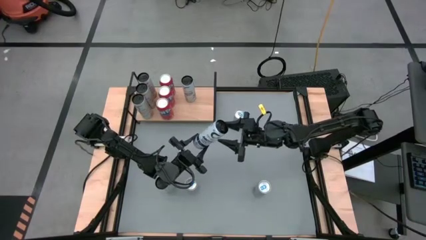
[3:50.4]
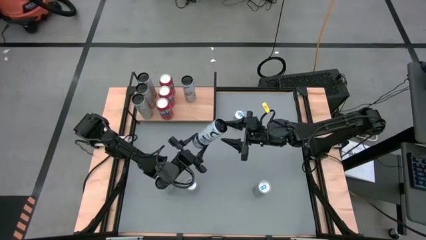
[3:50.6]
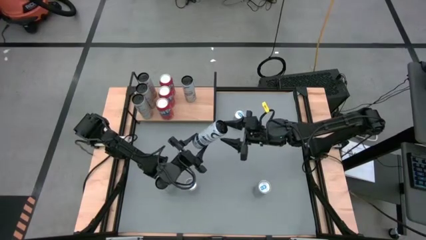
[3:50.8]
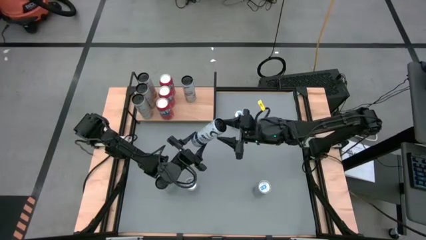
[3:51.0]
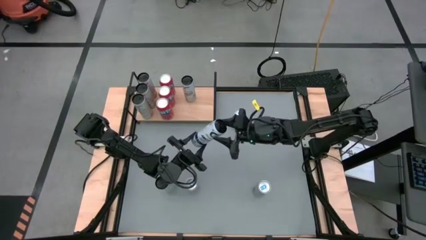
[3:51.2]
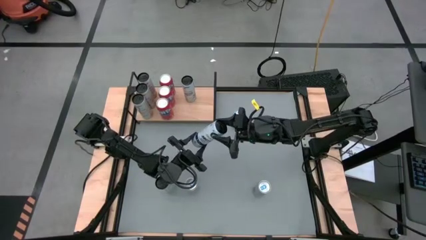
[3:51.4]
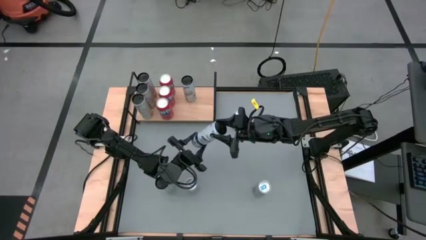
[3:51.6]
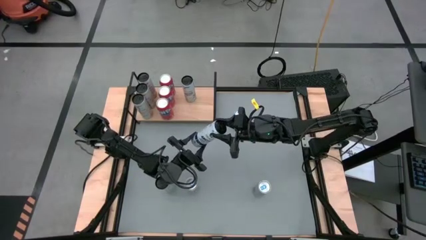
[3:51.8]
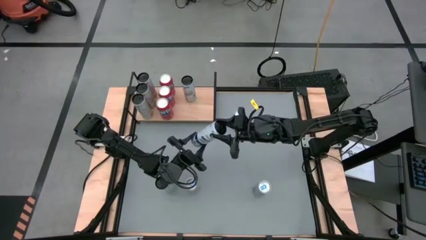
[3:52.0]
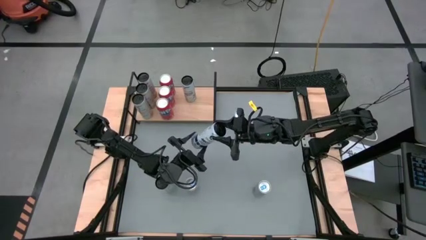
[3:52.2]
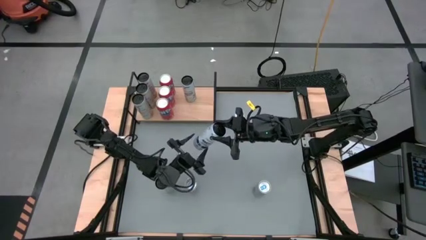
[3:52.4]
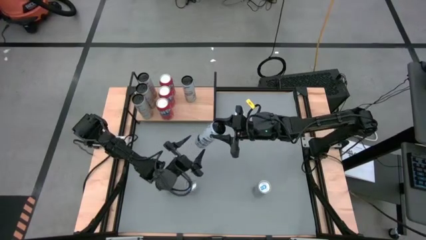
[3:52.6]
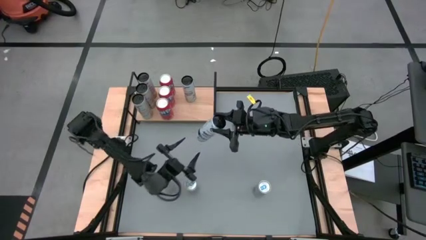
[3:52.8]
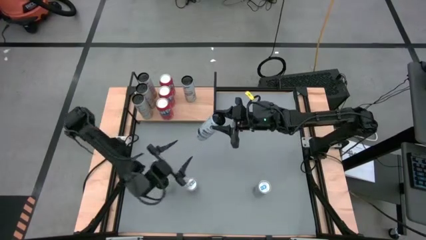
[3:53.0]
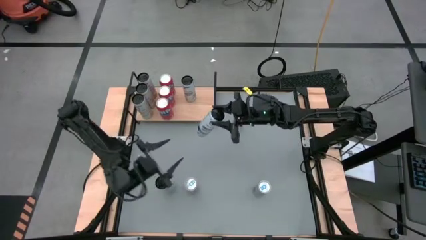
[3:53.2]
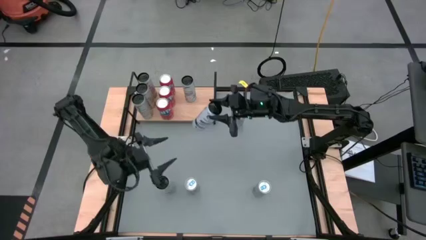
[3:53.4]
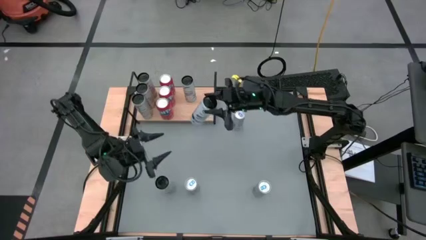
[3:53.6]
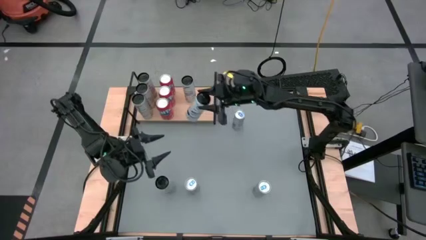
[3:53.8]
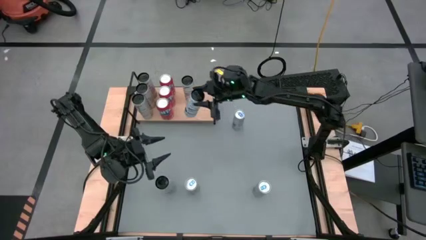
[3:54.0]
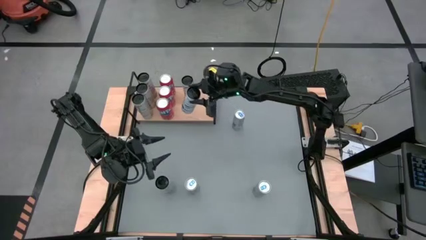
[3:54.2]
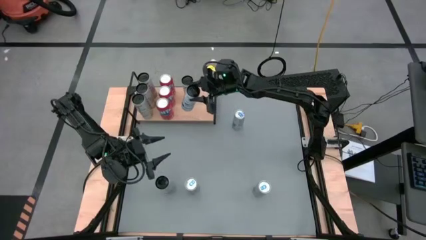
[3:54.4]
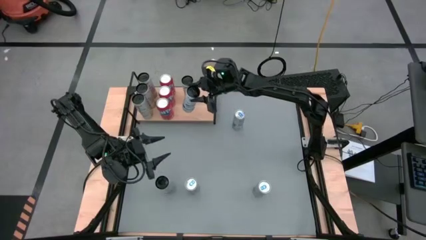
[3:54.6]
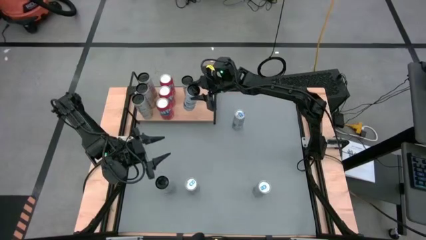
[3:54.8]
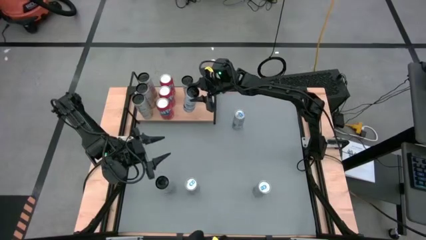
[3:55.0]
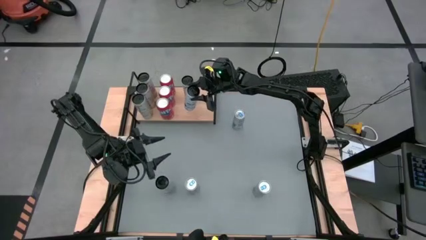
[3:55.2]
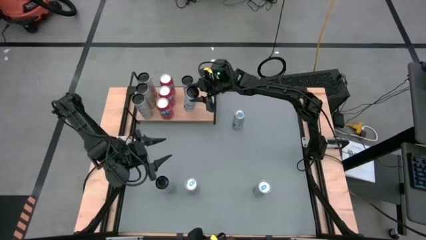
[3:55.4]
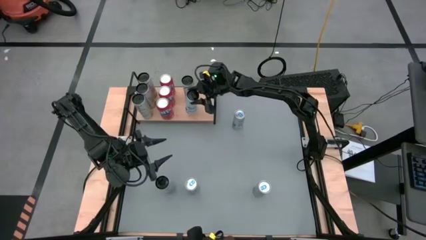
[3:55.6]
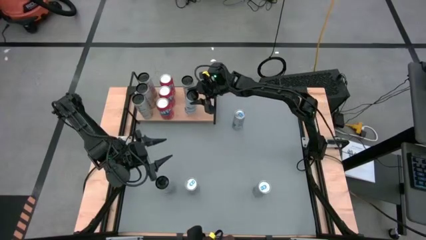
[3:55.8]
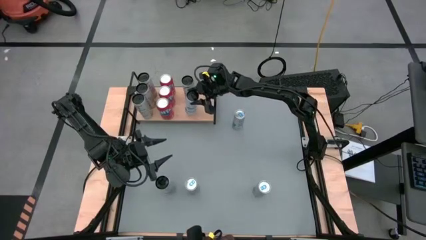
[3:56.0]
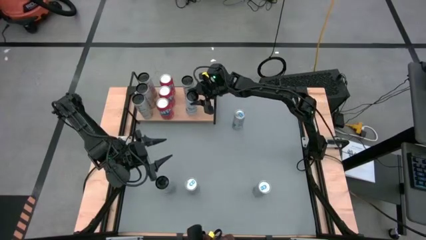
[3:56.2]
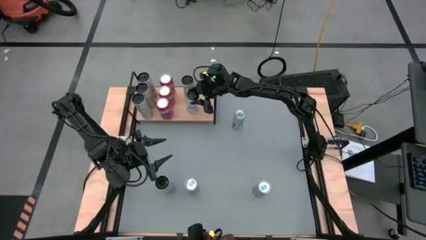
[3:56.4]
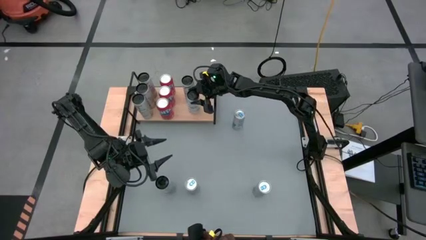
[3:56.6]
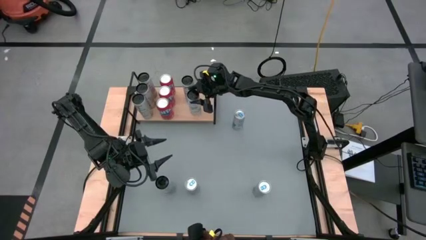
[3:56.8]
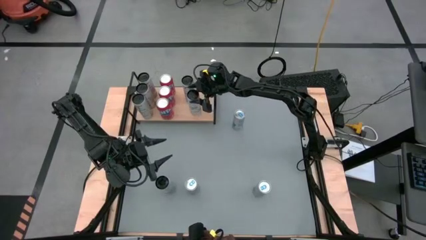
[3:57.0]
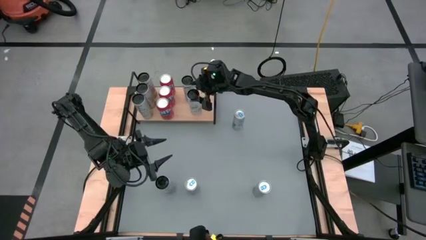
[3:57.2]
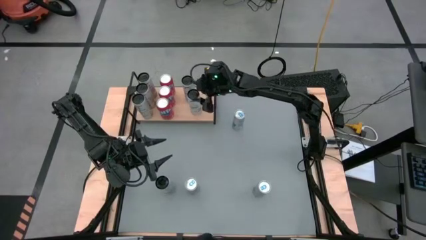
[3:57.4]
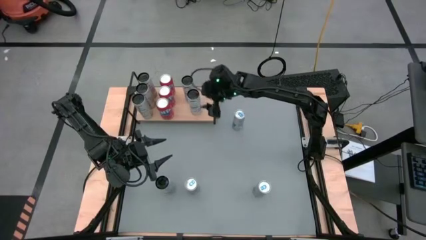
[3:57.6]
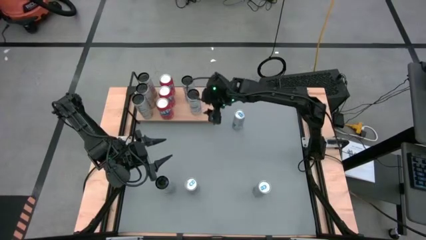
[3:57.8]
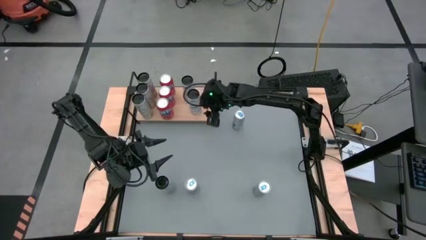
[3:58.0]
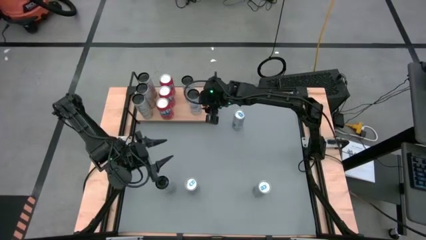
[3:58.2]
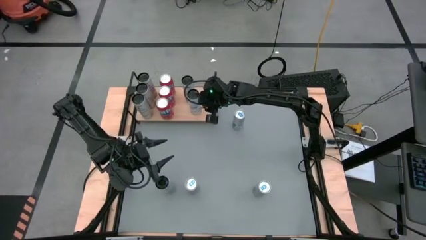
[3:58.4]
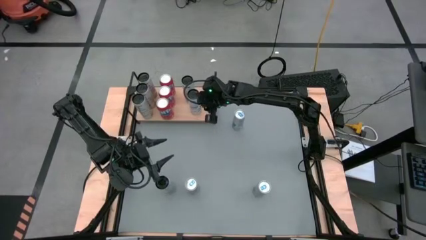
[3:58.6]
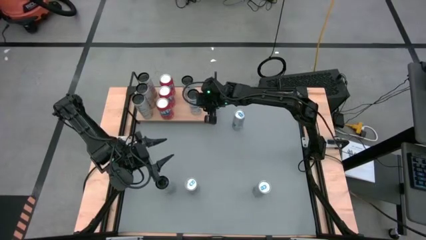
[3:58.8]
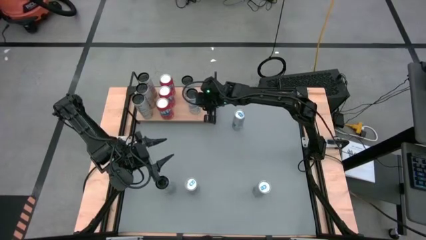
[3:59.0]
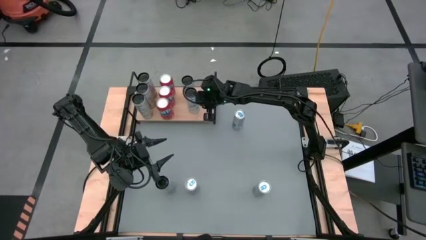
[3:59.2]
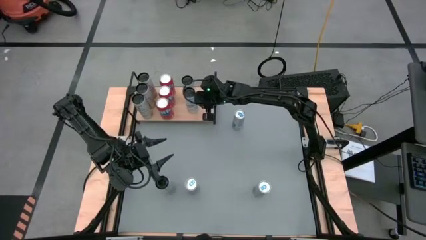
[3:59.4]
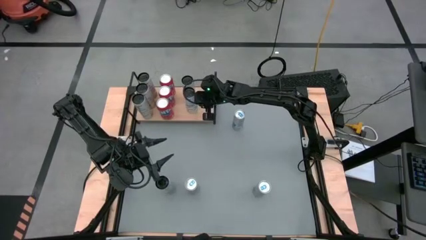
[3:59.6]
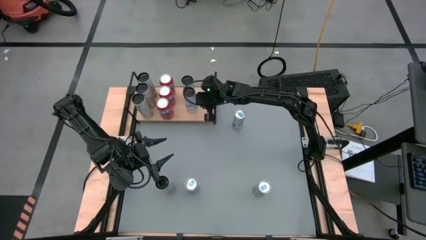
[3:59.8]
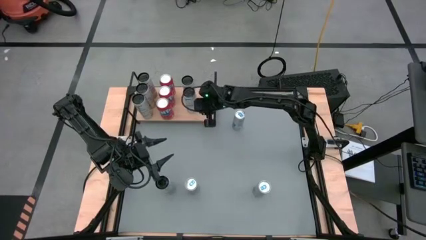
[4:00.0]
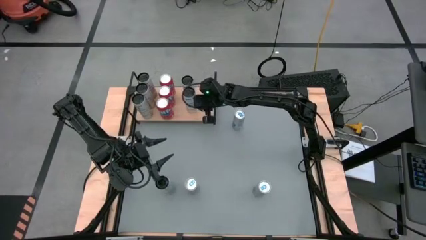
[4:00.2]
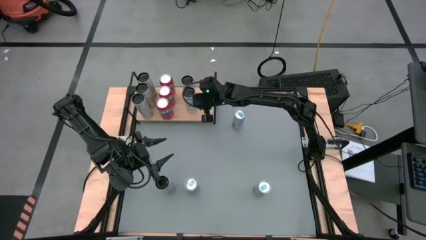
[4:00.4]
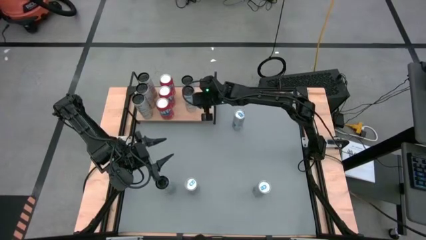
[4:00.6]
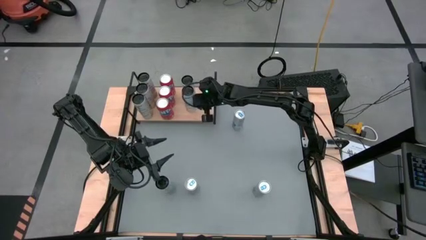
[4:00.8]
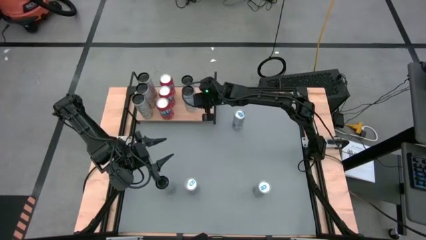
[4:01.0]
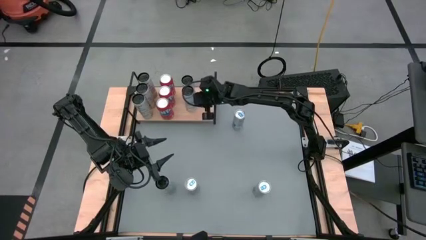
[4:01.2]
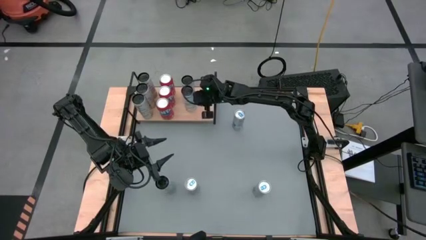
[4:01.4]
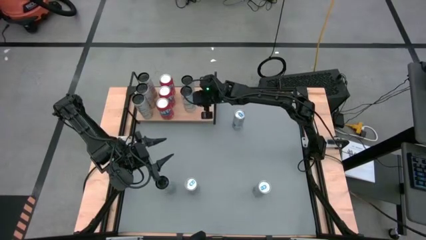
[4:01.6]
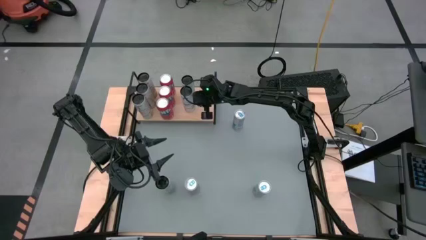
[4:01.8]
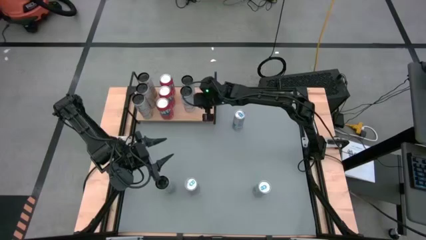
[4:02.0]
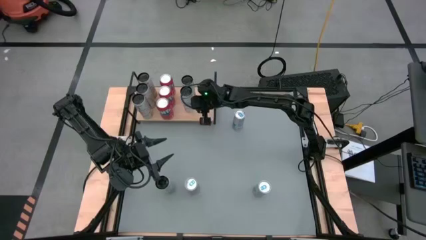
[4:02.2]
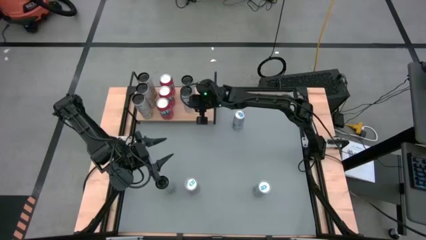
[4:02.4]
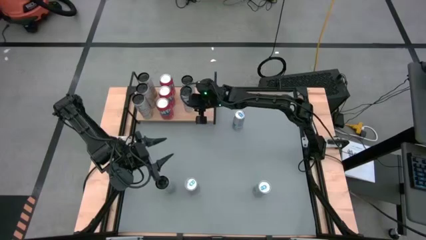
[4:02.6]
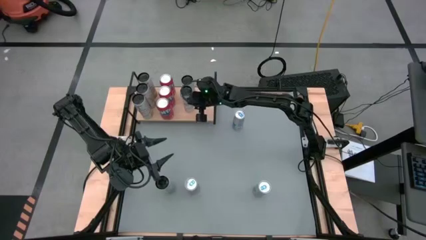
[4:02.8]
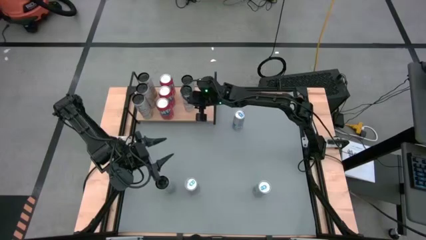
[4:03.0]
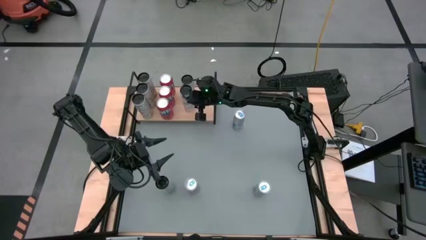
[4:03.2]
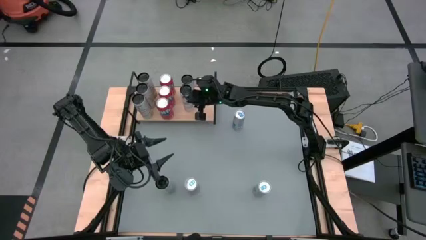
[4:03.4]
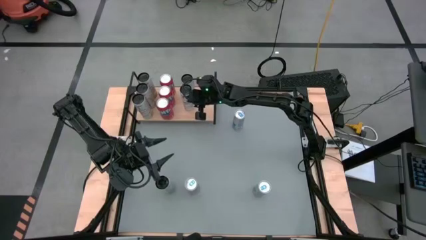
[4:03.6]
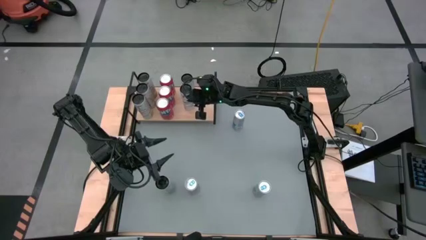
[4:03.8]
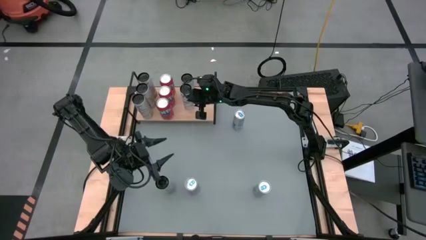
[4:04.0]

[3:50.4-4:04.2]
Task: Place canned beverage on shelf
Put the right white-blue soda can on the shelf aligned with the other white-blue soda can
